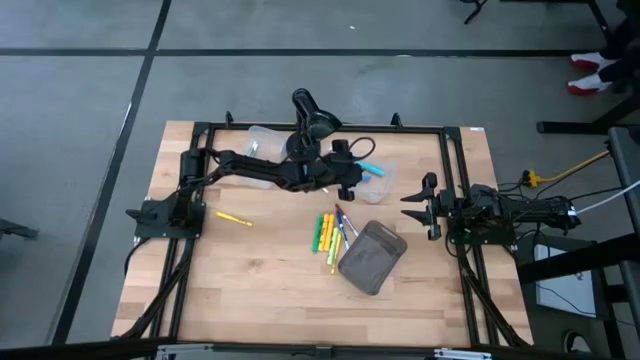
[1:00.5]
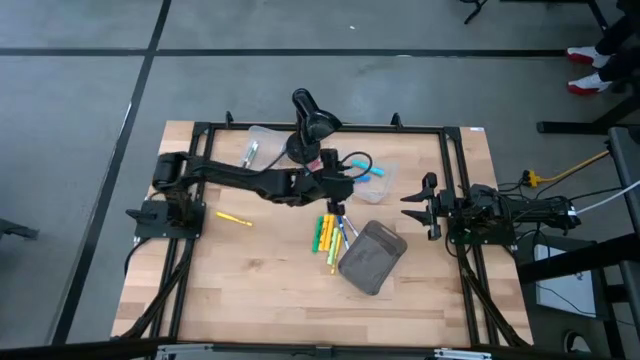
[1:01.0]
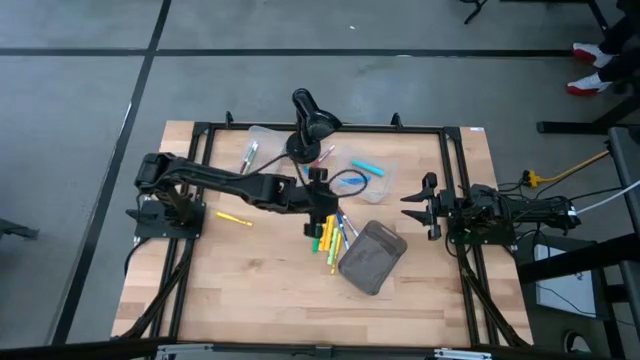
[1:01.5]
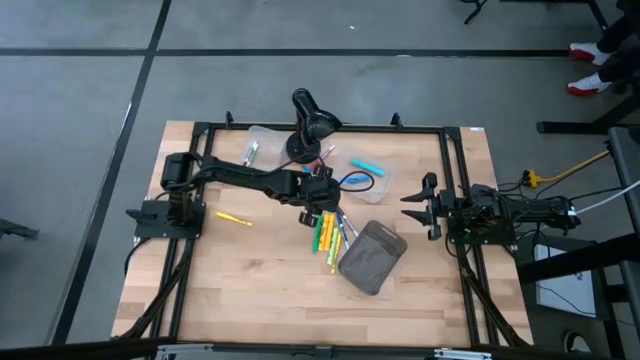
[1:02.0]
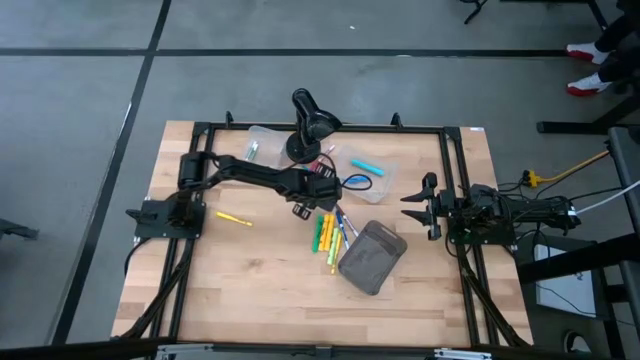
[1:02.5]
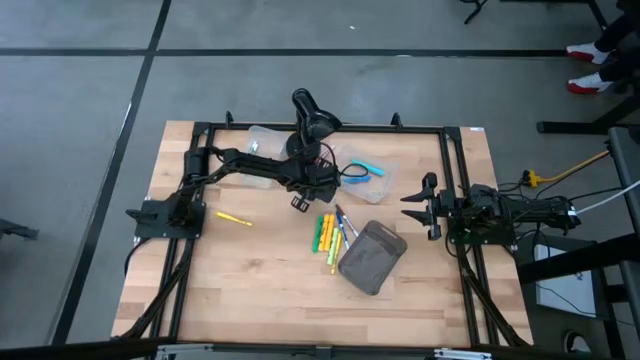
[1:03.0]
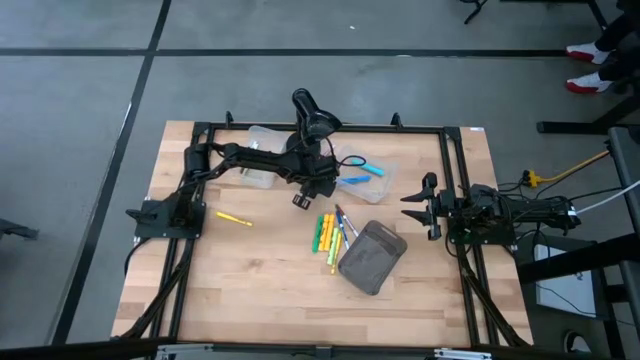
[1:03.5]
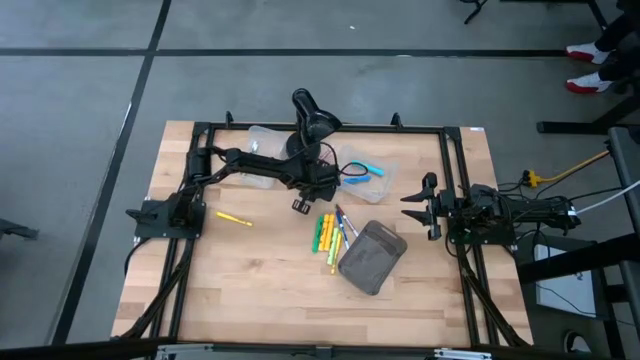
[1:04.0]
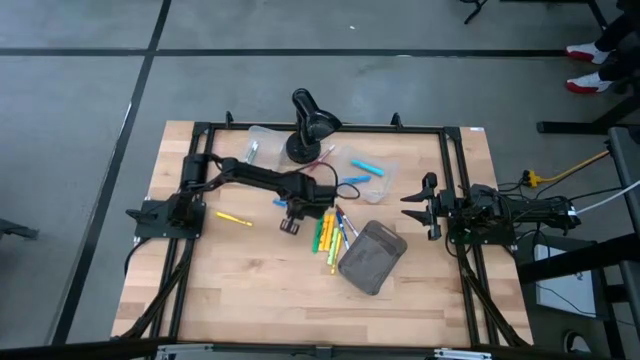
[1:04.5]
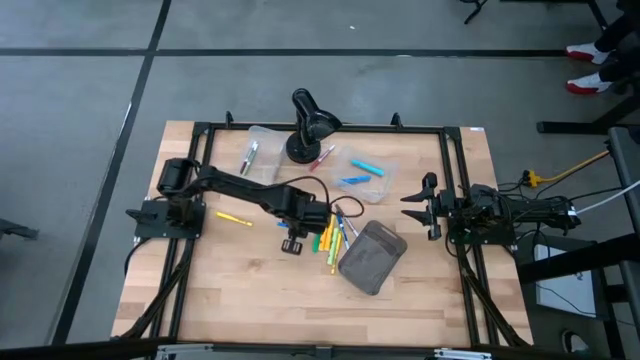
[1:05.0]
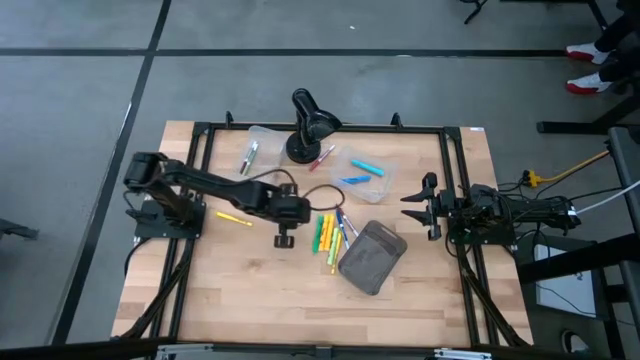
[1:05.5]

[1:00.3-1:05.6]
Task: Pick & Place Markers
Put the light blue marker pen into the left transparent bin

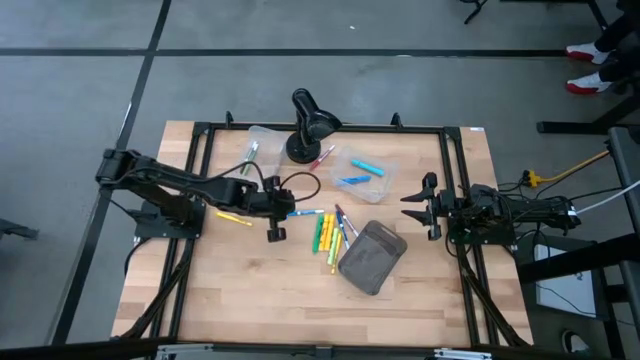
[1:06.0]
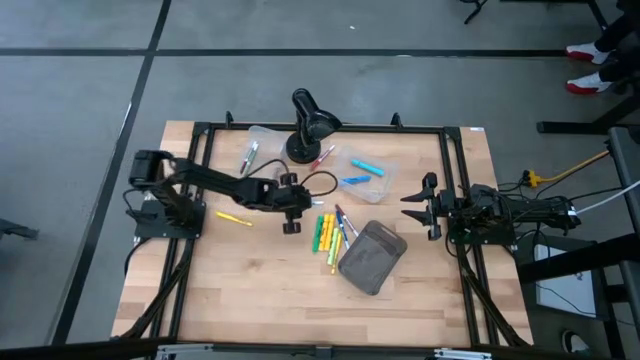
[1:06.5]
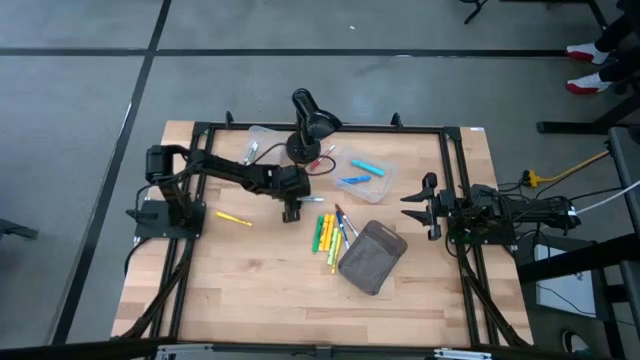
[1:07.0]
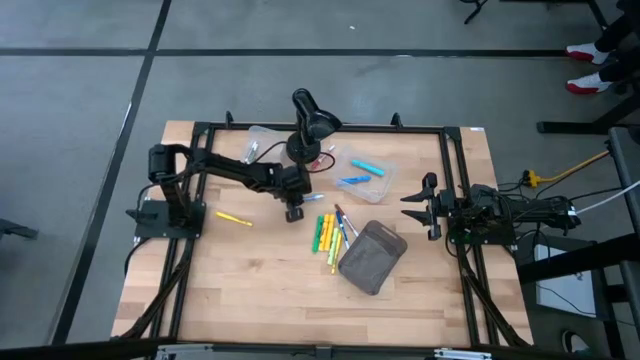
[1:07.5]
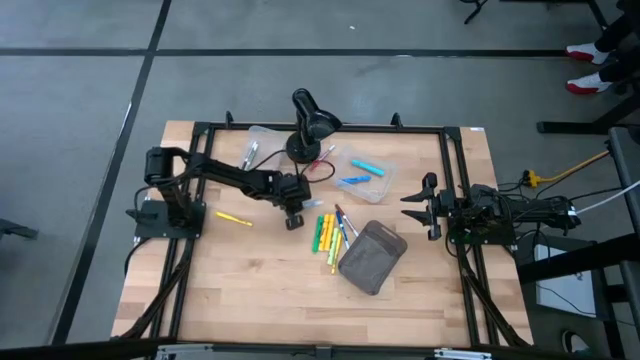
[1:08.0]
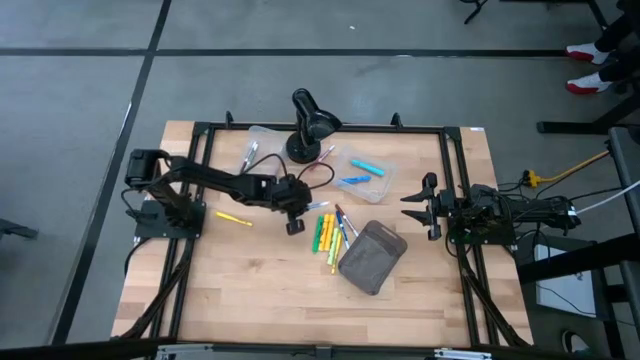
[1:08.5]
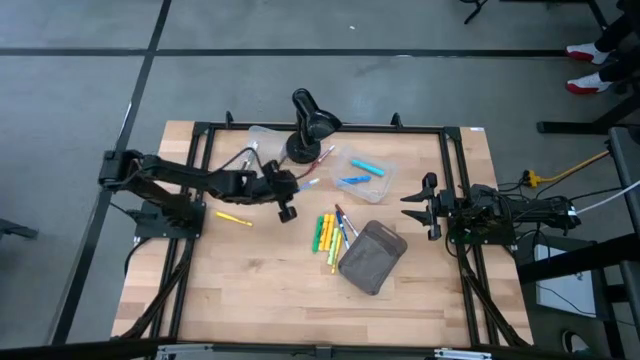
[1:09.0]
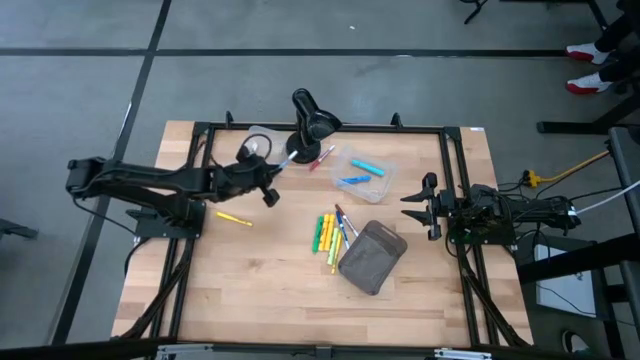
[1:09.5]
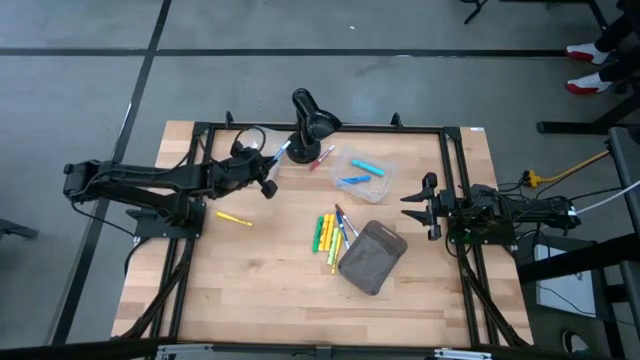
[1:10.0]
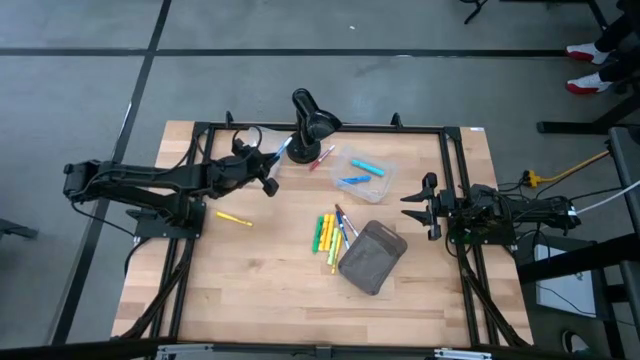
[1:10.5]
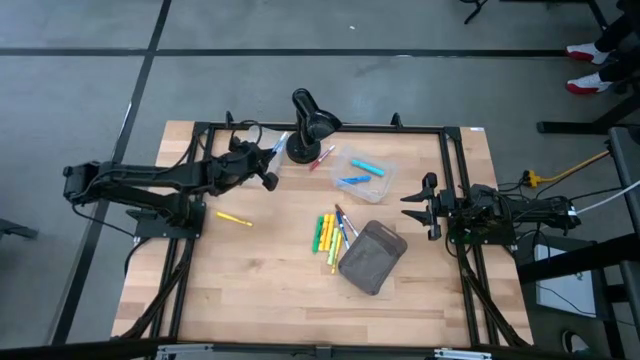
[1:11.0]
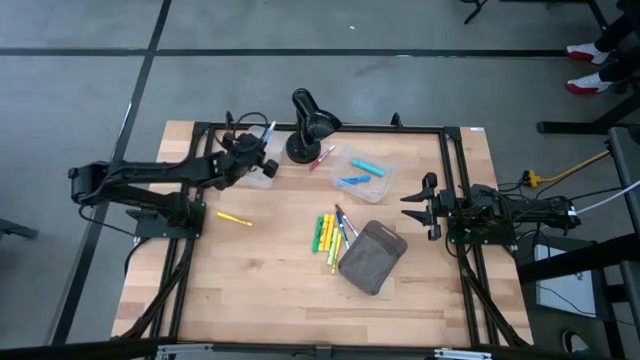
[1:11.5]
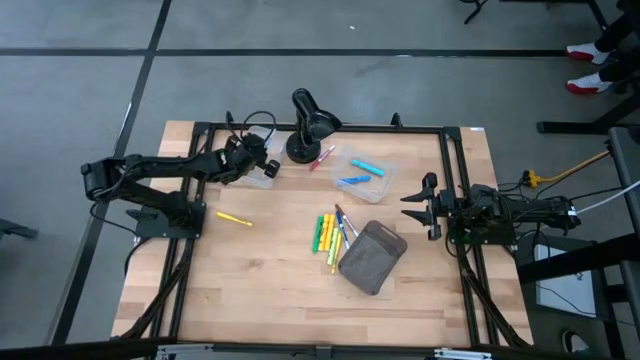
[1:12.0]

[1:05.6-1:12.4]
Put the light blue marker pen into the left transparent bin

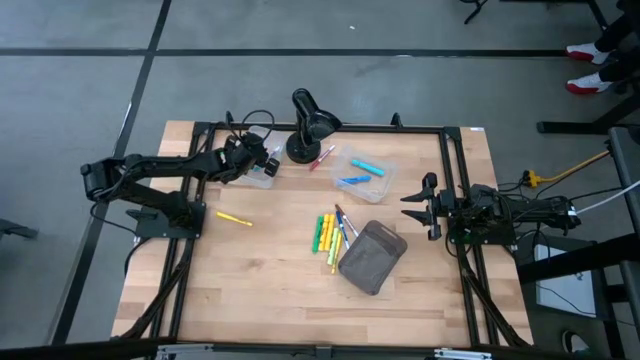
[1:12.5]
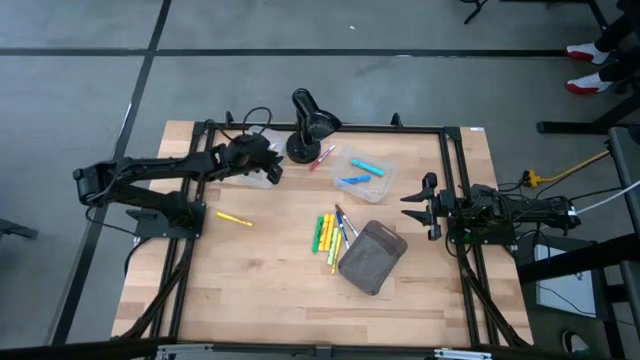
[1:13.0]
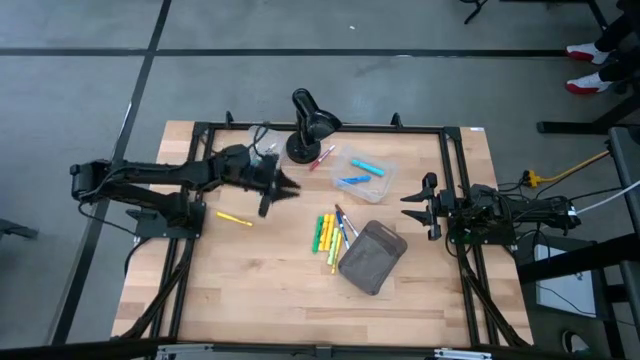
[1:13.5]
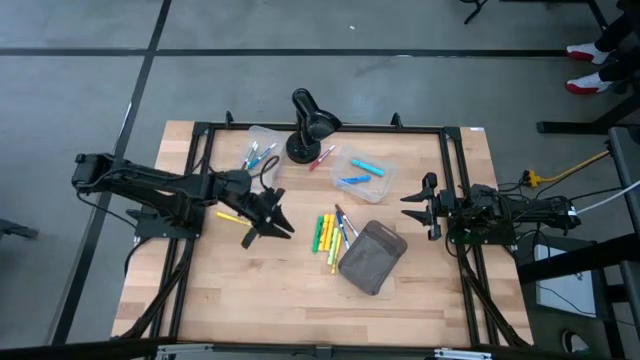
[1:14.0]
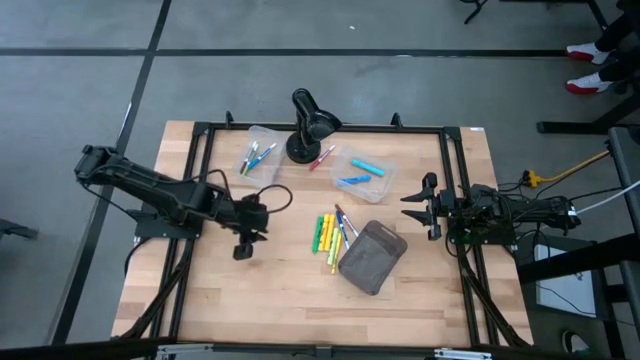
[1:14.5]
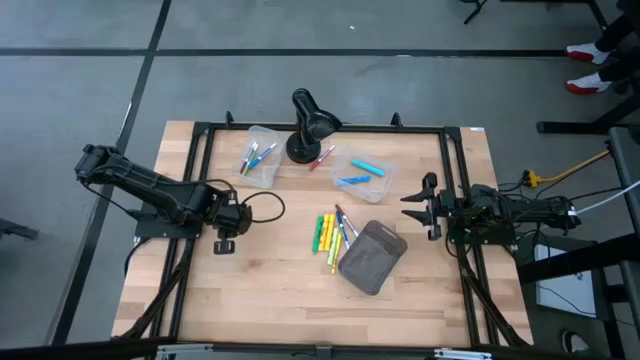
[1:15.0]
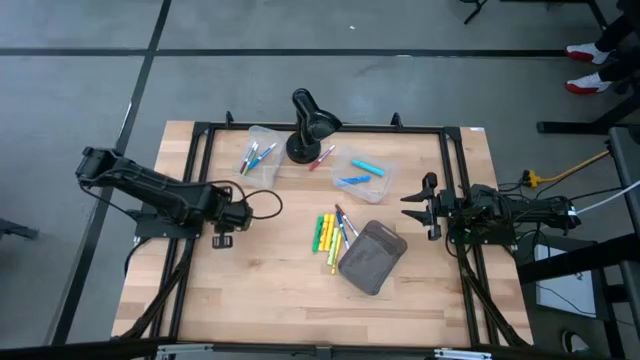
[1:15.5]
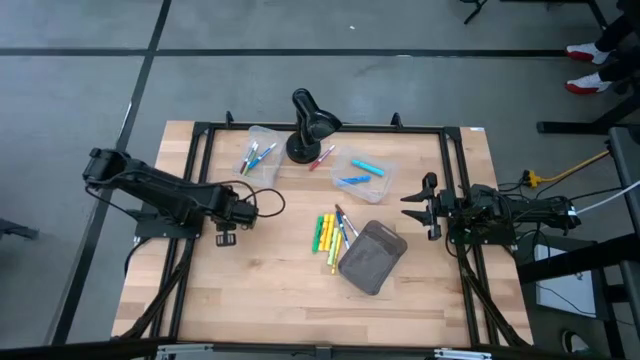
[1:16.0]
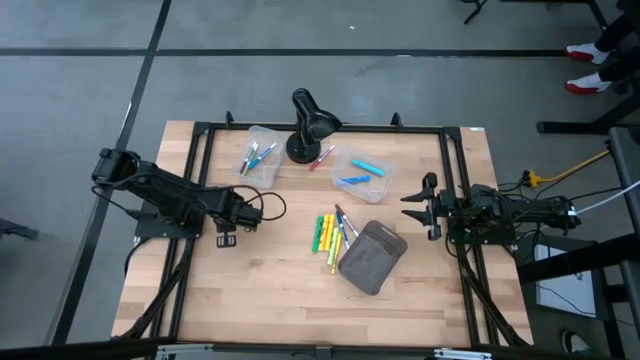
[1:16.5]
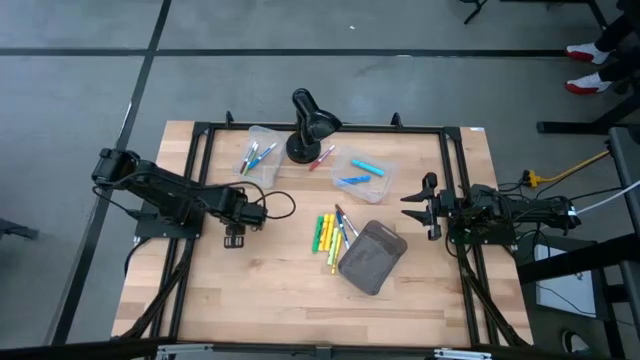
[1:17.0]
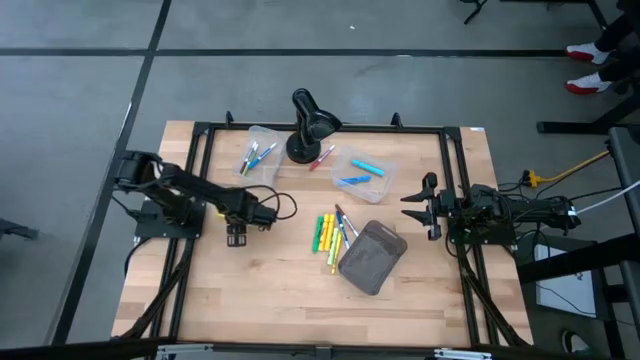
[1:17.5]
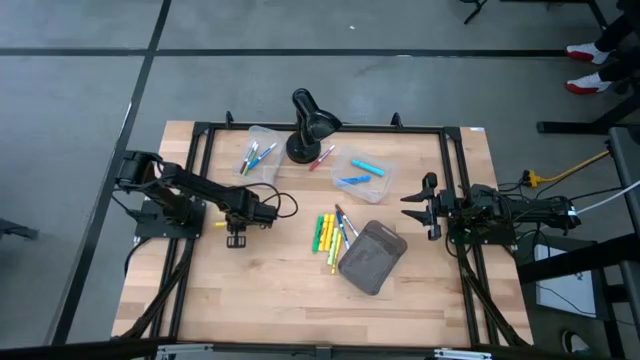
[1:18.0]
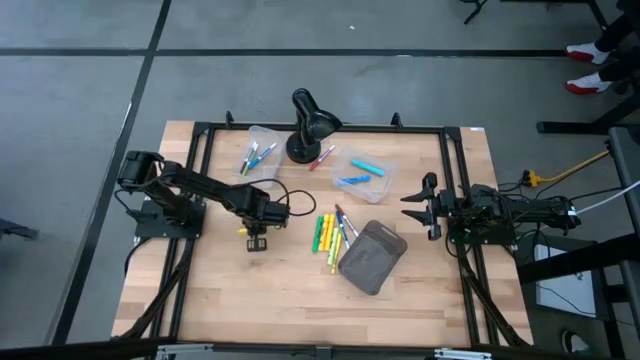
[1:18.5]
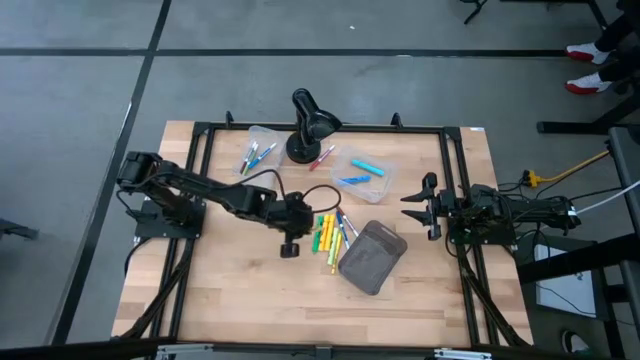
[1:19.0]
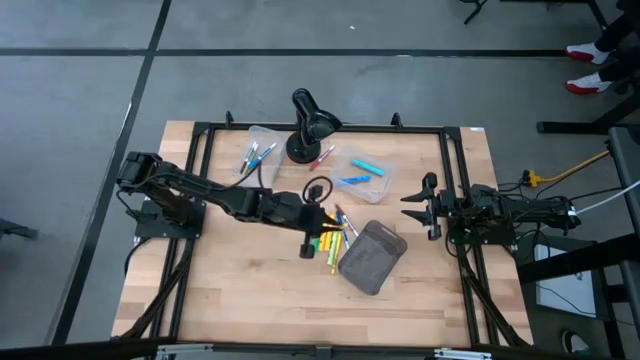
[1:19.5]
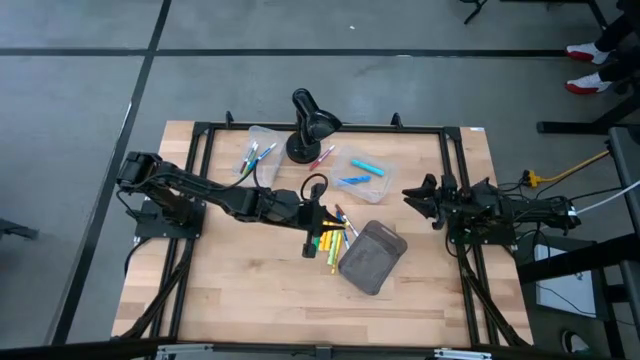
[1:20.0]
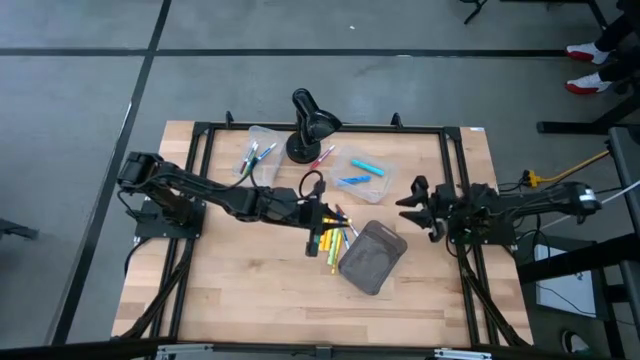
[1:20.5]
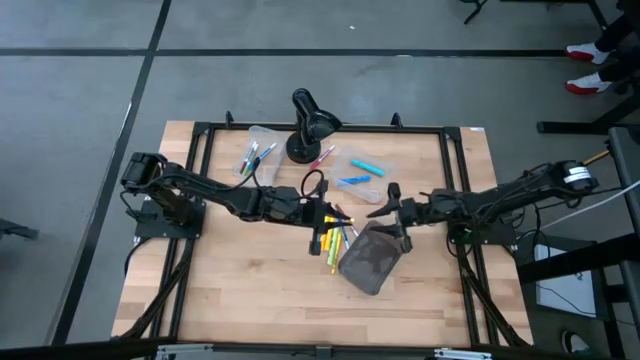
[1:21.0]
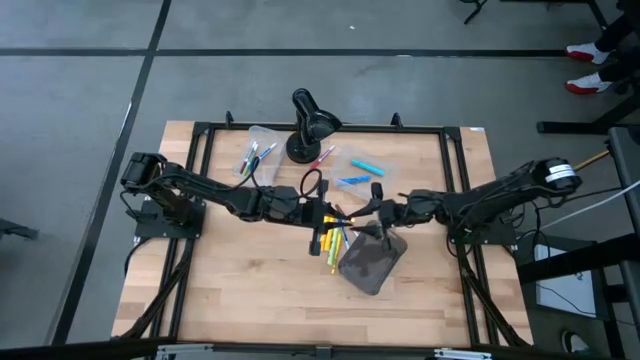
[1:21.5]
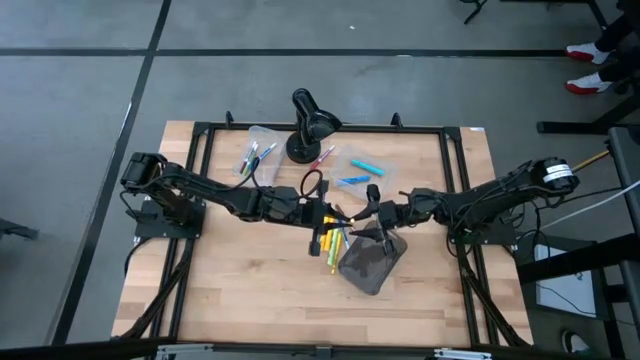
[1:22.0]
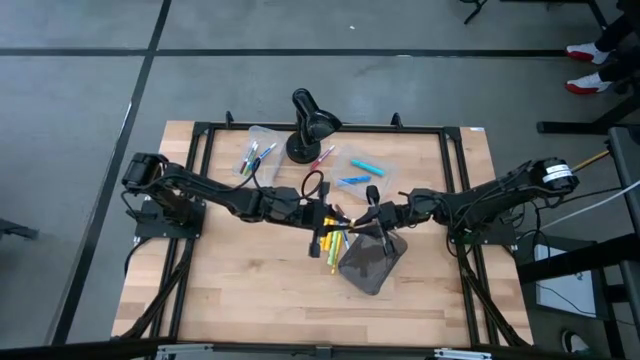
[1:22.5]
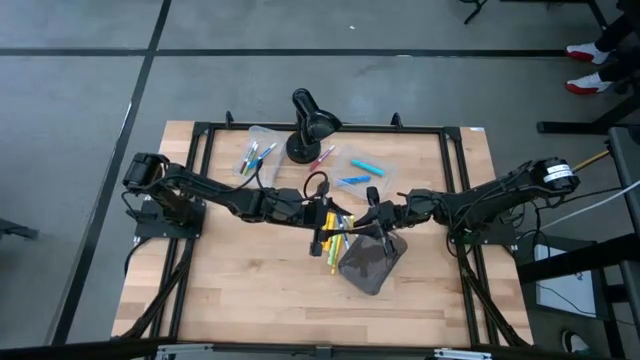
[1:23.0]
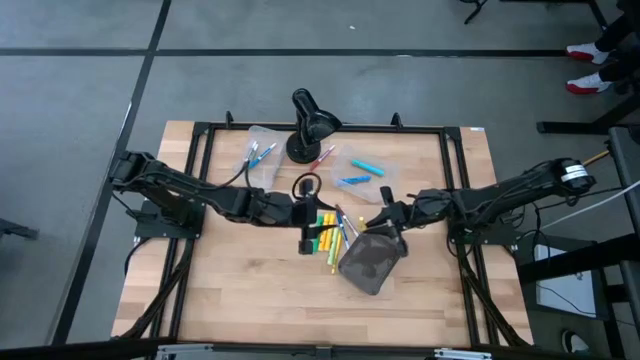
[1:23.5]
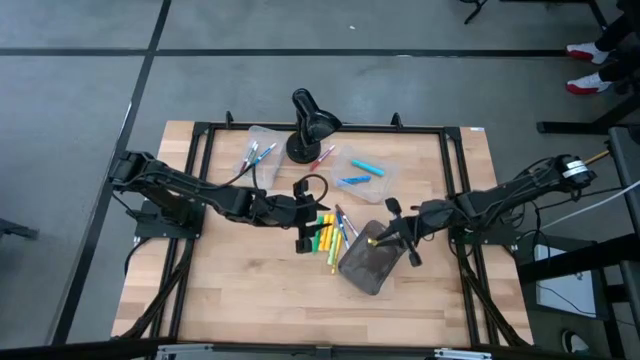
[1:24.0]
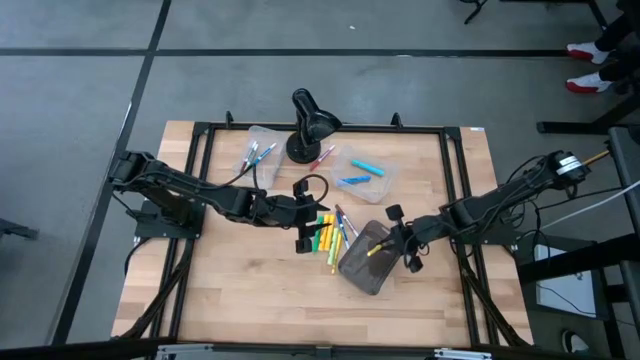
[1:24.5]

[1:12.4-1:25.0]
Put the left yellow pen into the black bin
